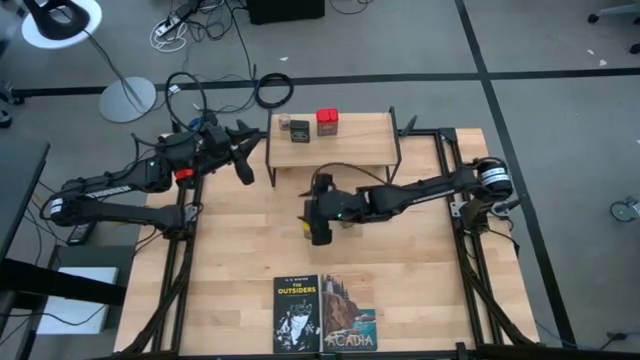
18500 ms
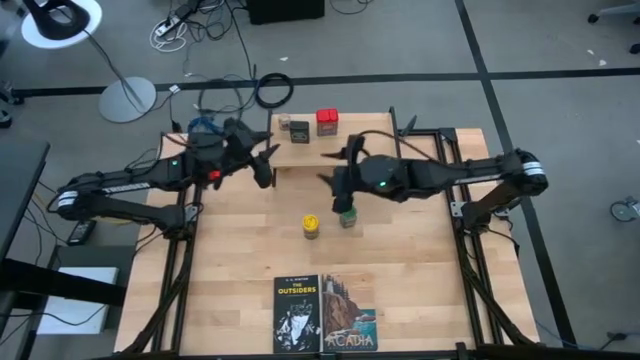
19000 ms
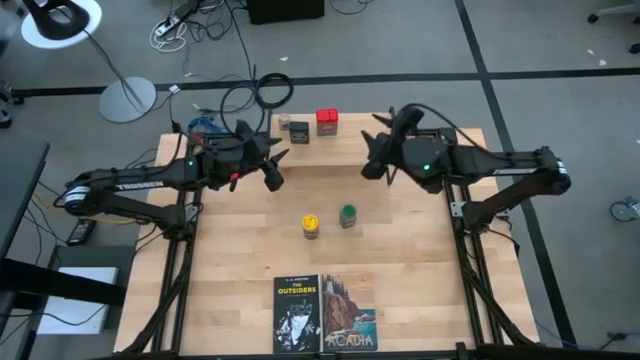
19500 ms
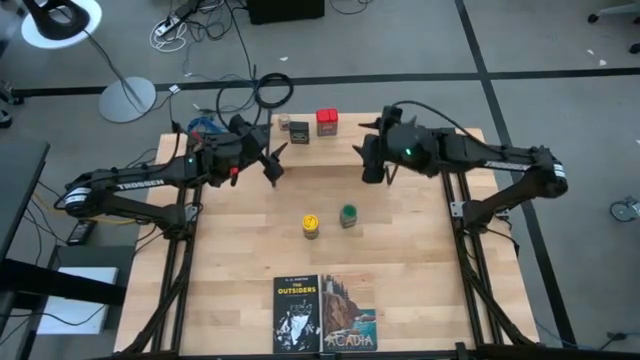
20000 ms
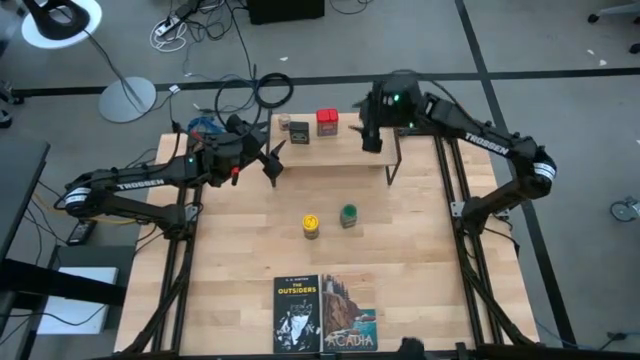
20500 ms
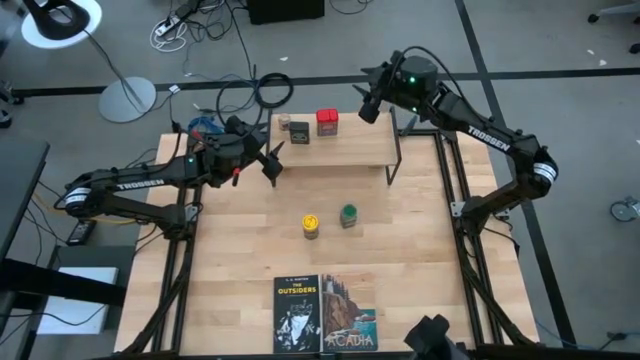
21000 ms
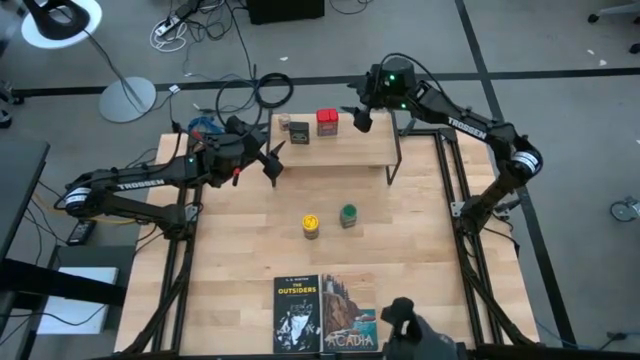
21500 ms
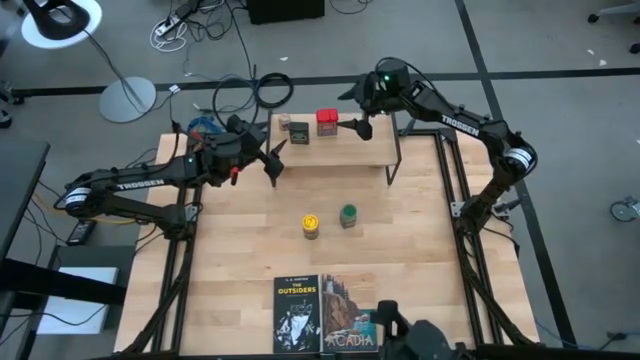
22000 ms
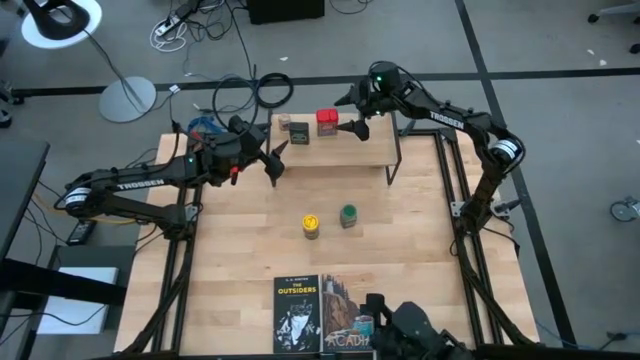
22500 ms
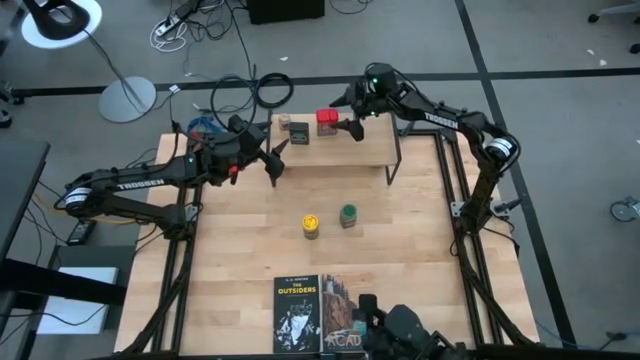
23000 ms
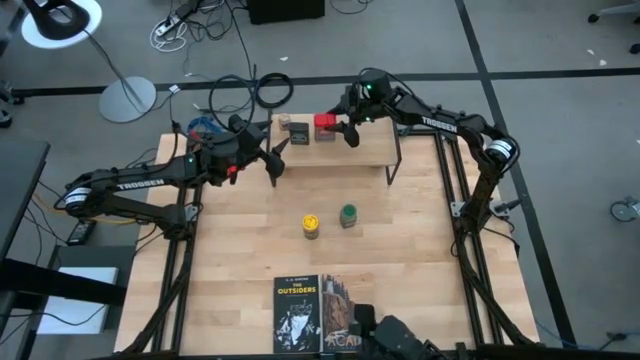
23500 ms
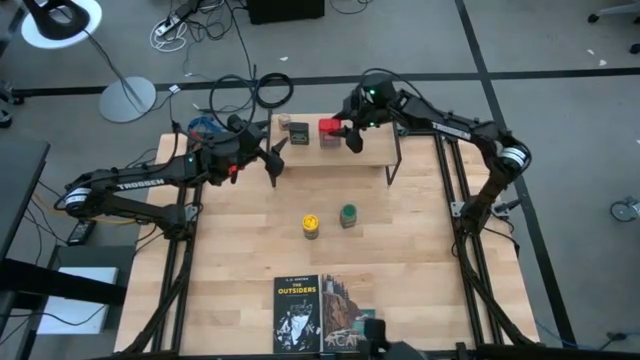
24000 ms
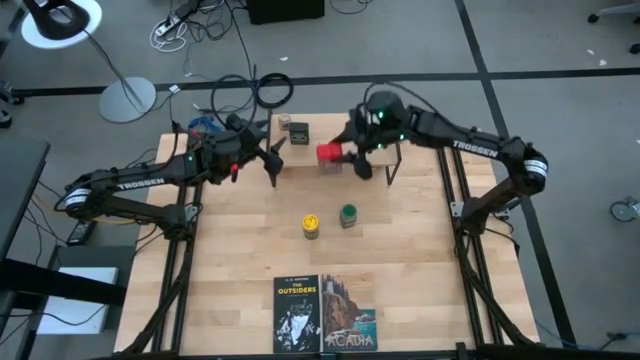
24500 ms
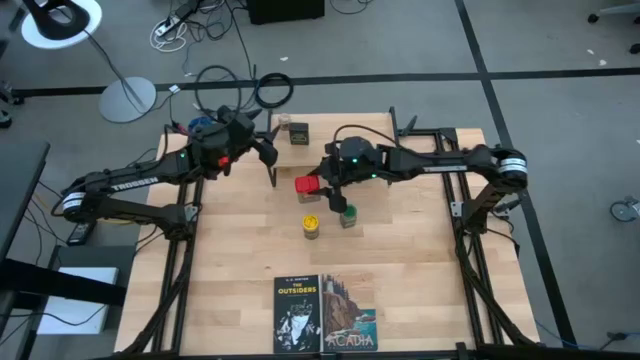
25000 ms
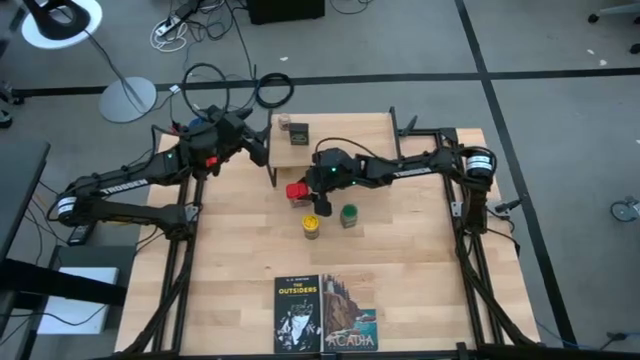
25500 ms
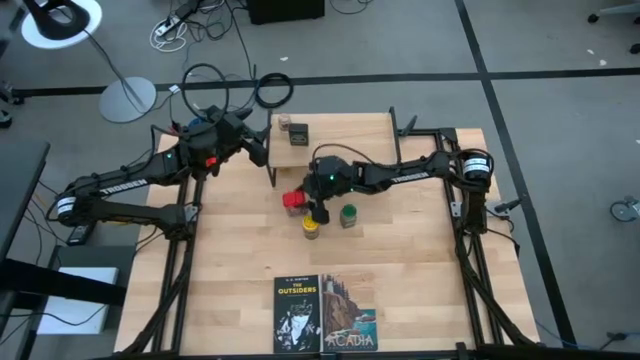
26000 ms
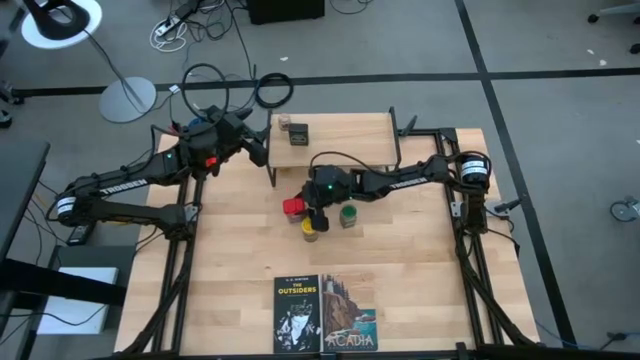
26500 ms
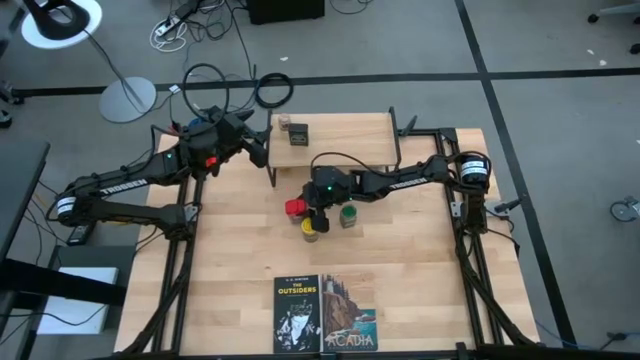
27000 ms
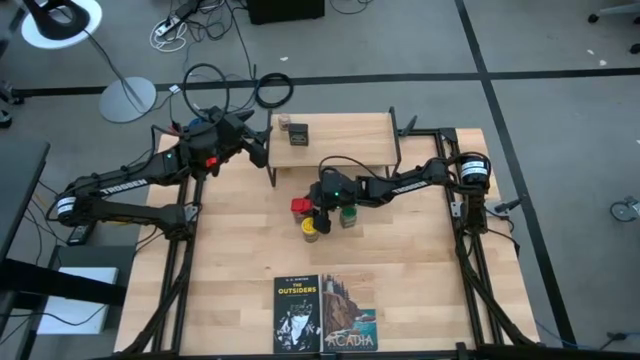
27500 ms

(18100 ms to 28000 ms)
Task: Shelf spices
Remove the red seasoning can from the shelf

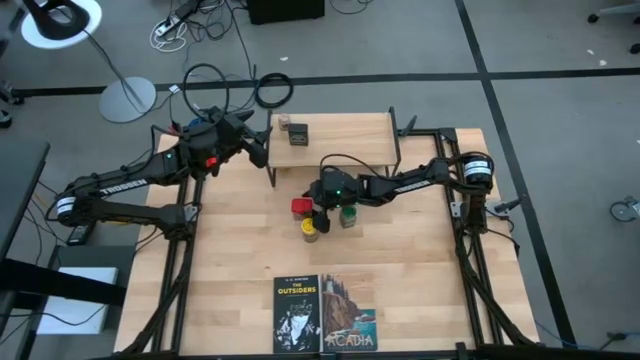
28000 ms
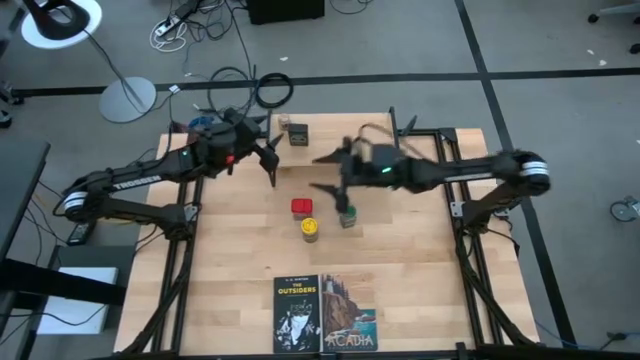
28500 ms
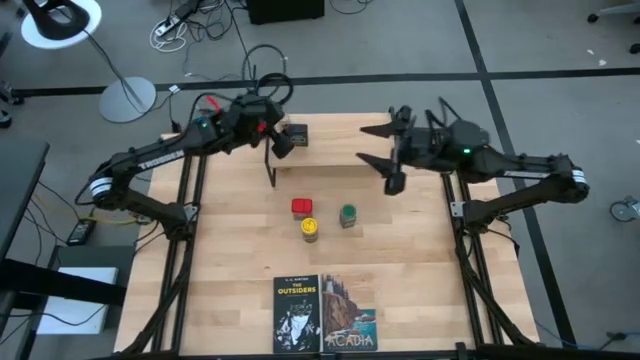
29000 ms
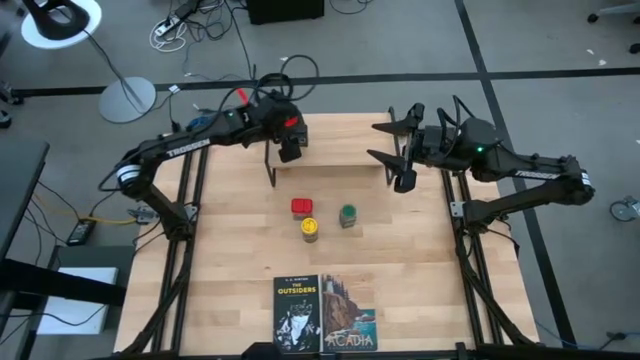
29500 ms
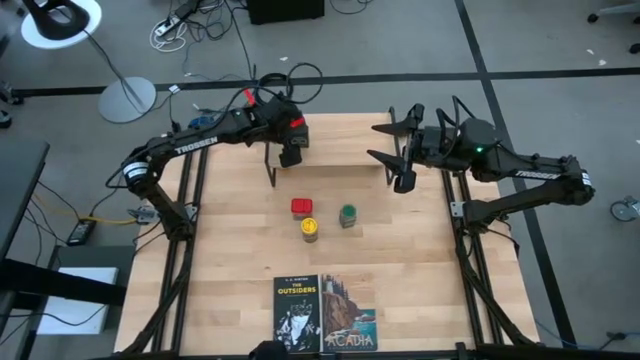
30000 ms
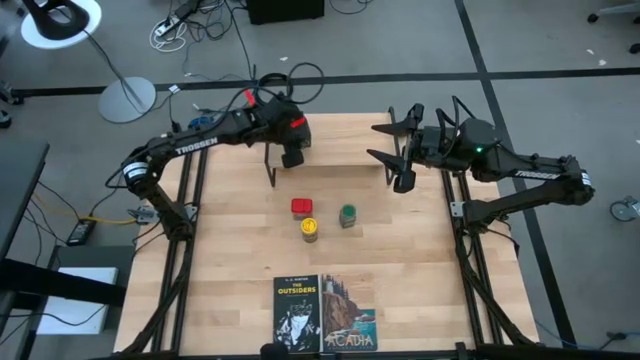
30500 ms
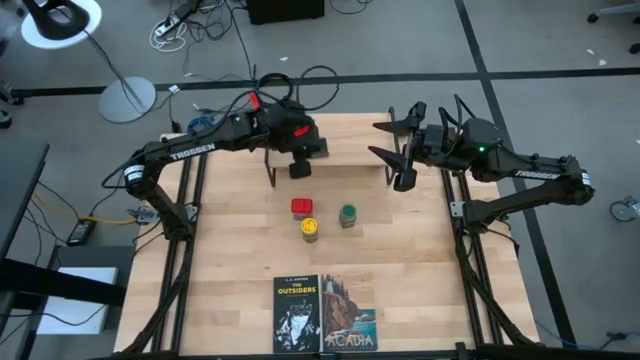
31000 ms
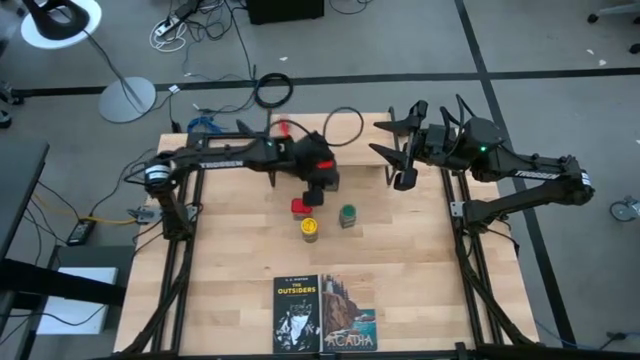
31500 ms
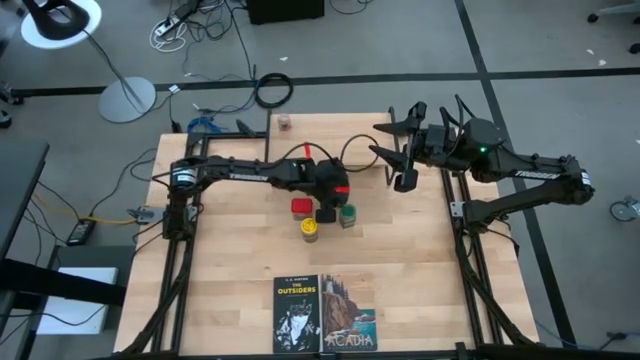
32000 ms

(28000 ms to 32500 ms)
Remove the black seasoning can from the shelf

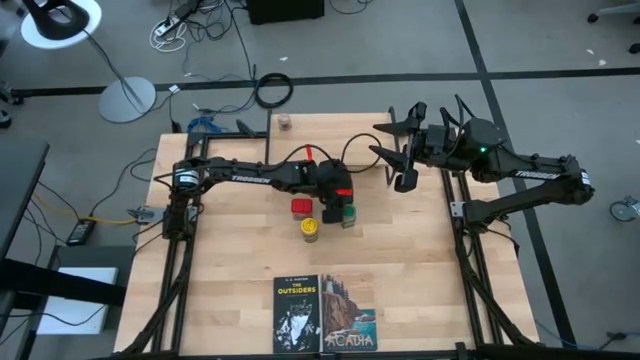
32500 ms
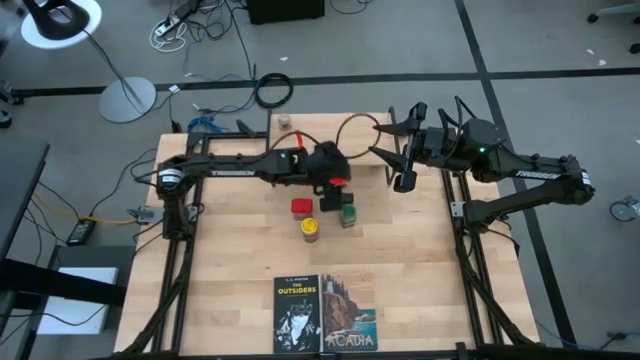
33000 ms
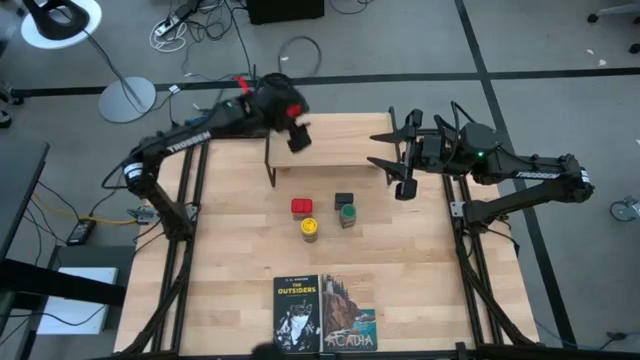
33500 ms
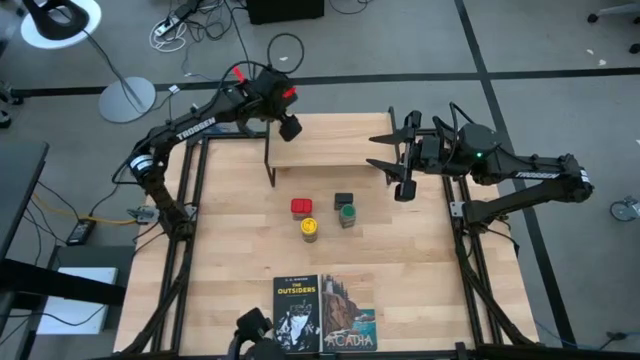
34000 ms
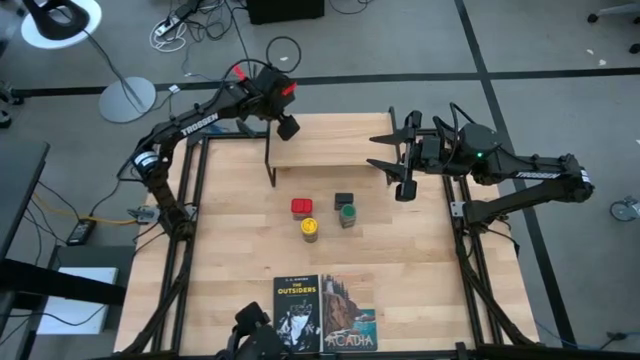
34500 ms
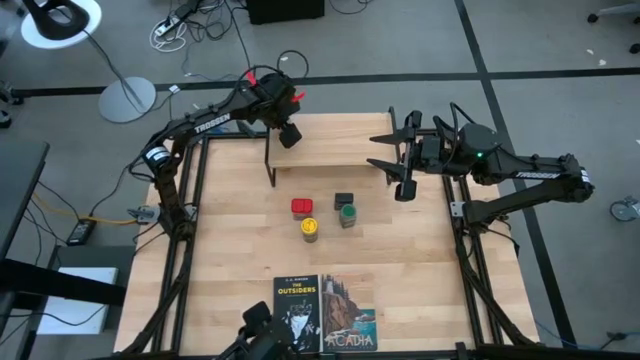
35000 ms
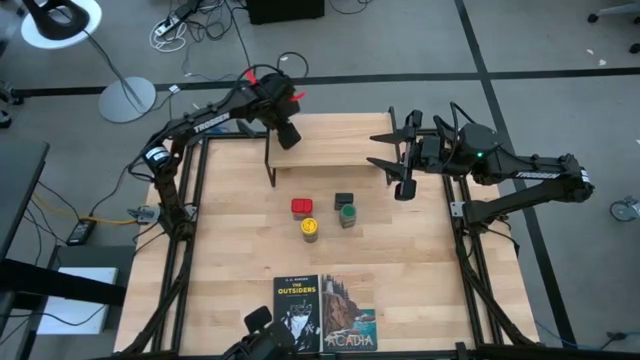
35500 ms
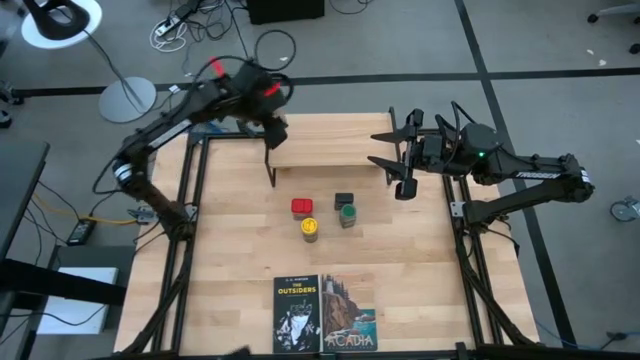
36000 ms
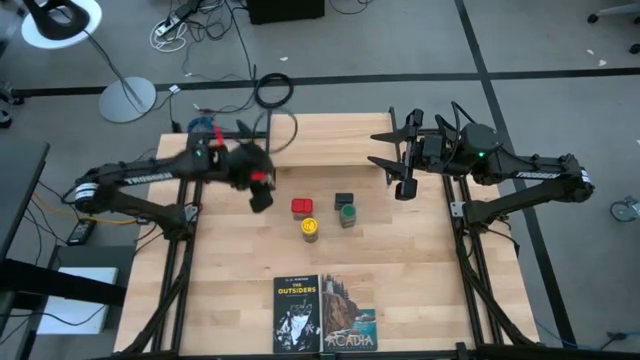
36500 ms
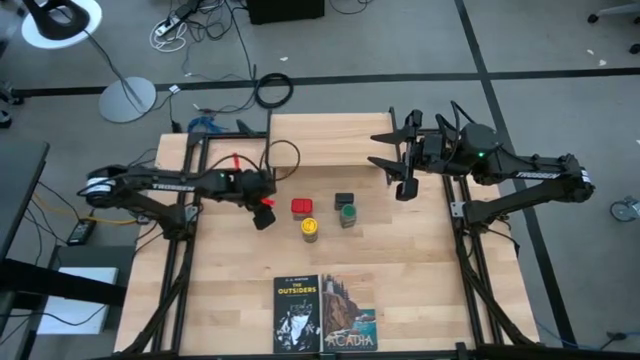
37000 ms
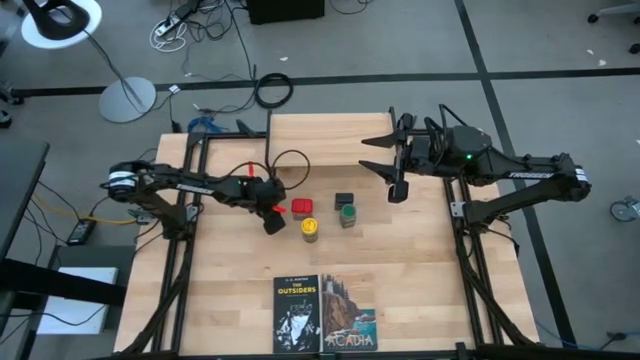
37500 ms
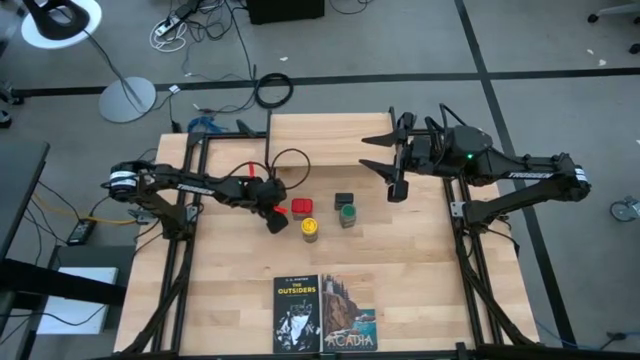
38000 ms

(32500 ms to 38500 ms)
Remove the brown seasoning bottle from the shelf

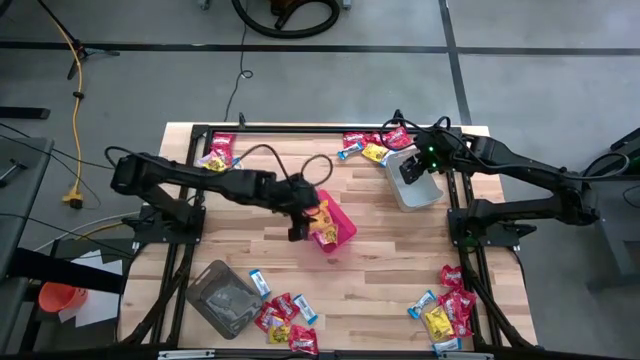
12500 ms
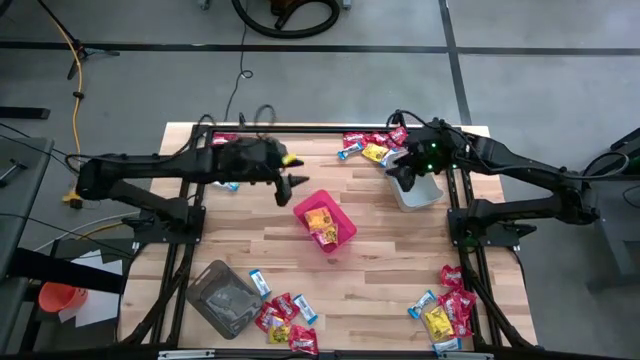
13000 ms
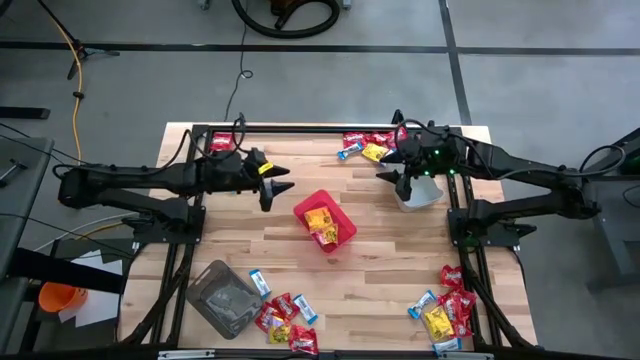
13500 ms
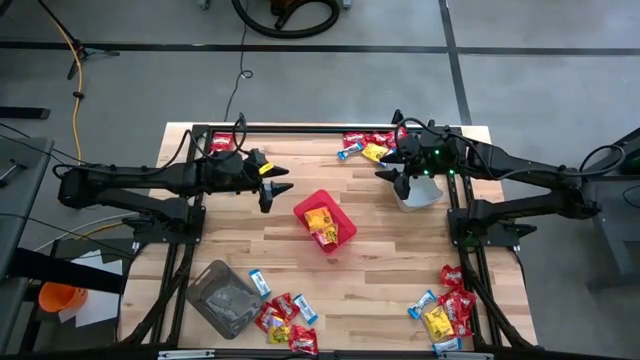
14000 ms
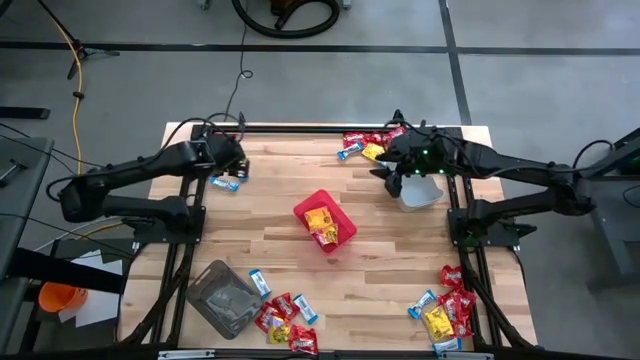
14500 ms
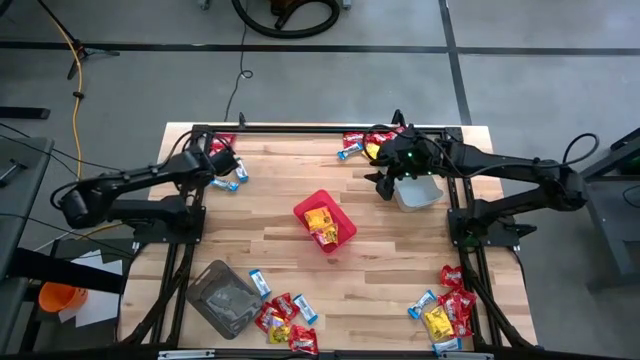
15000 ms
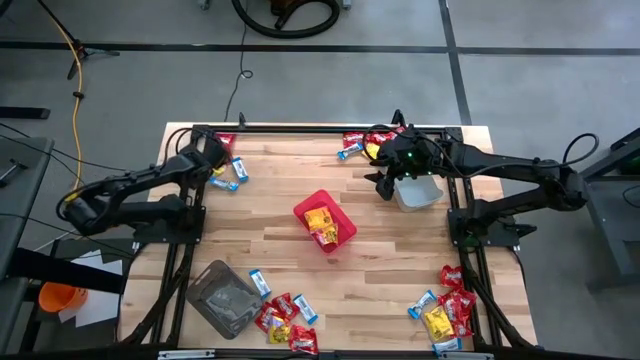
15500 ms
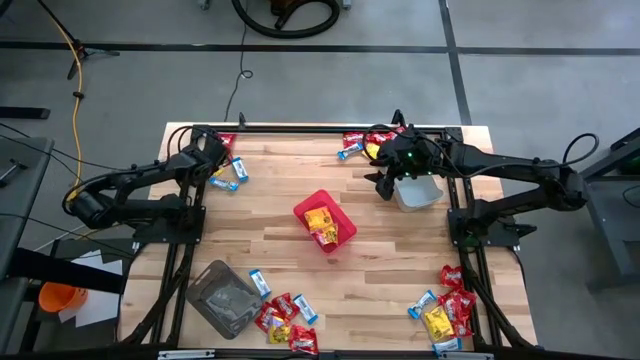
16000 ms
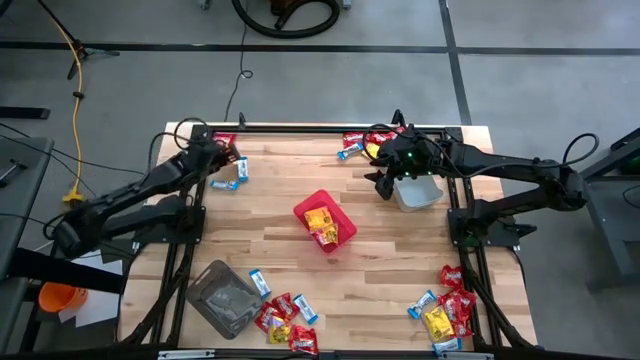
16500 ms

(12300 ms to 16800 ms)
Task: Sort candy
Put the yellow candy into the red bin
